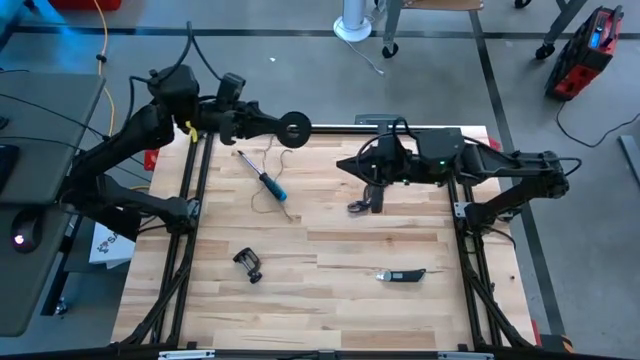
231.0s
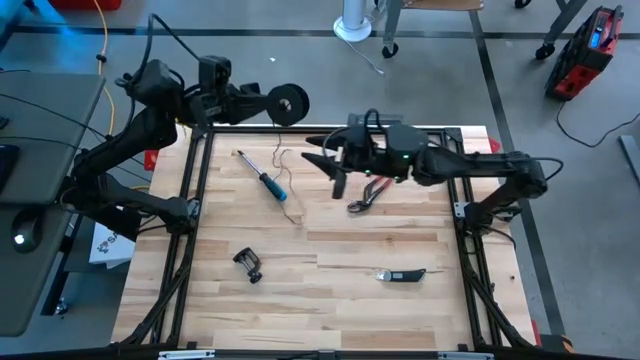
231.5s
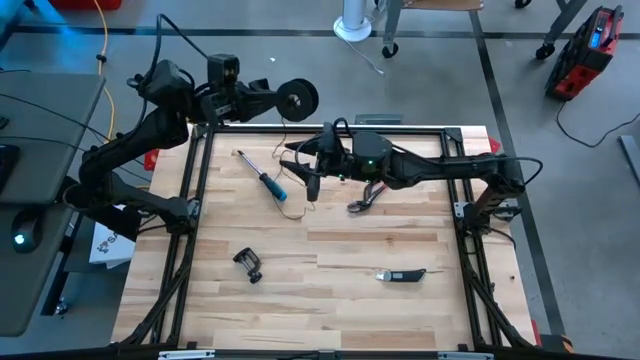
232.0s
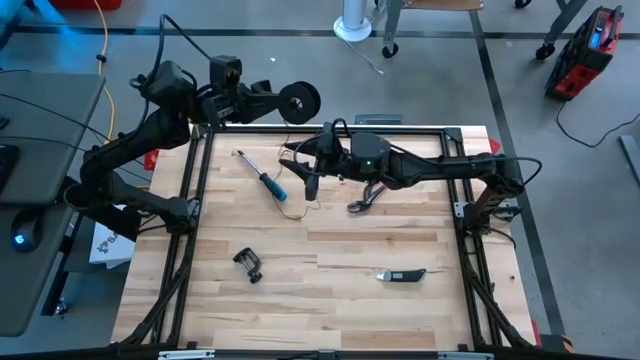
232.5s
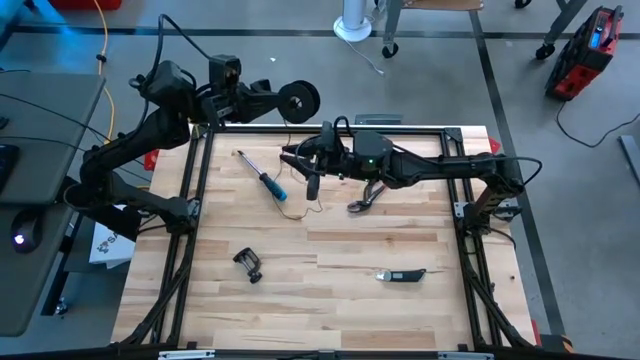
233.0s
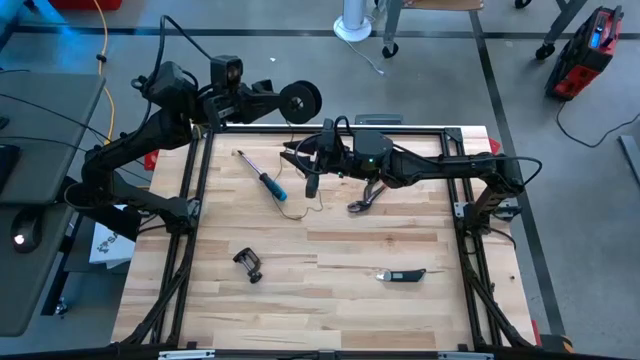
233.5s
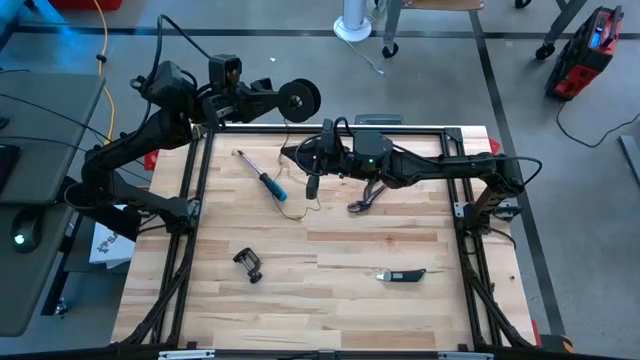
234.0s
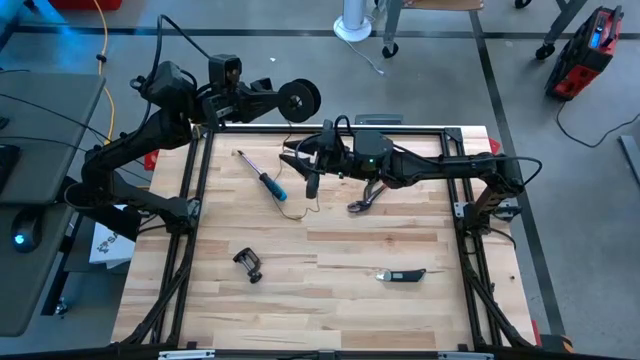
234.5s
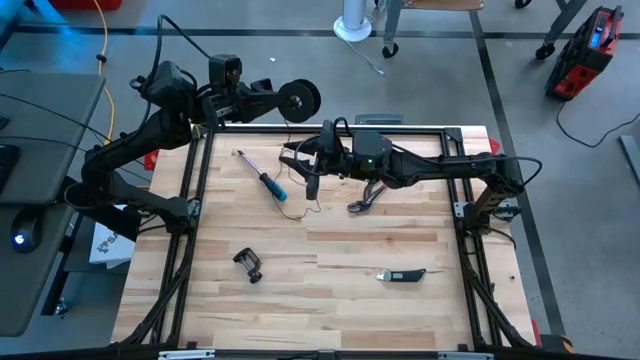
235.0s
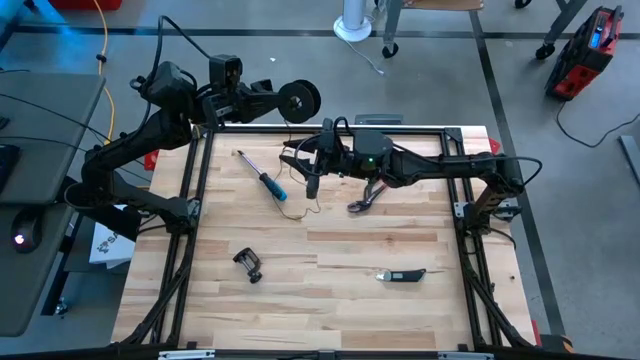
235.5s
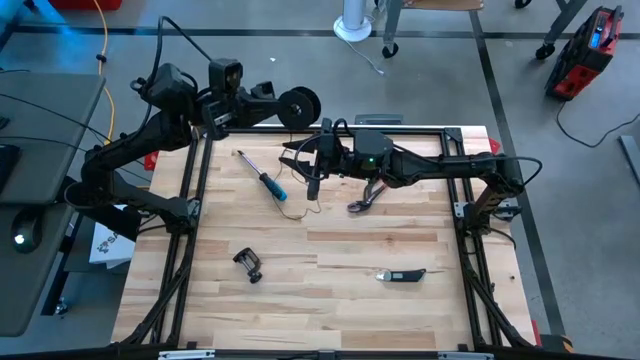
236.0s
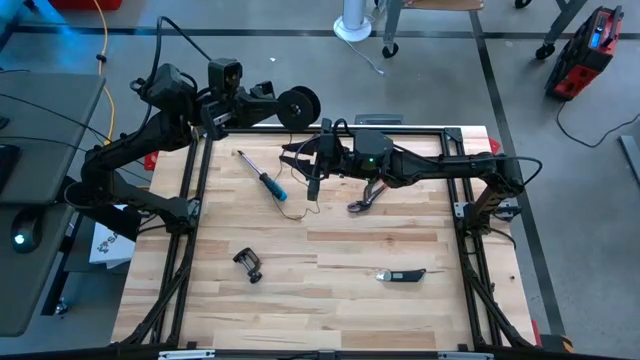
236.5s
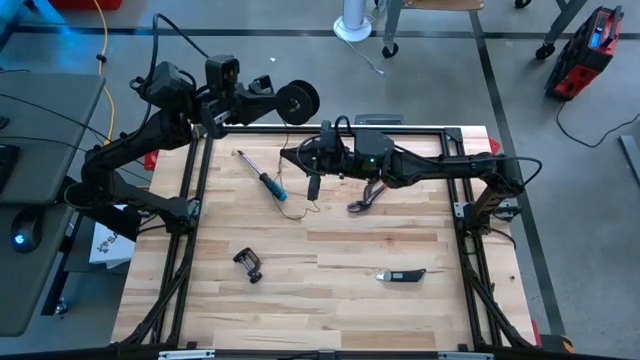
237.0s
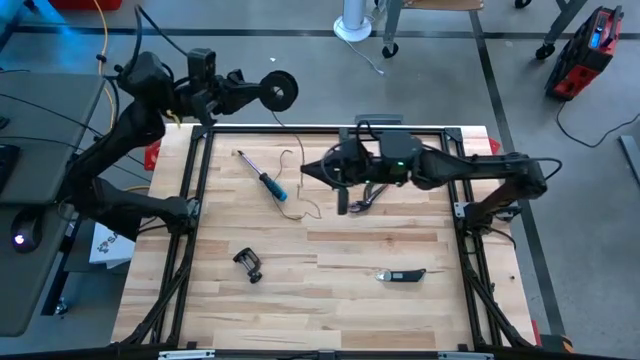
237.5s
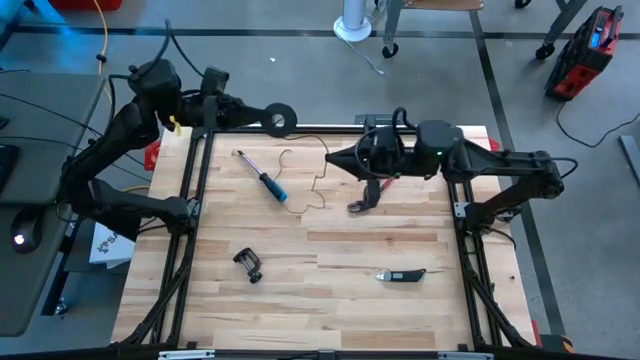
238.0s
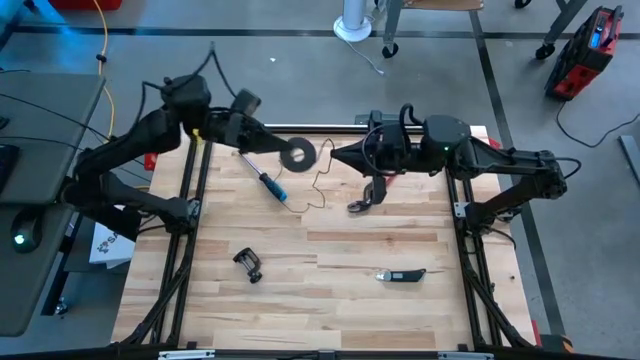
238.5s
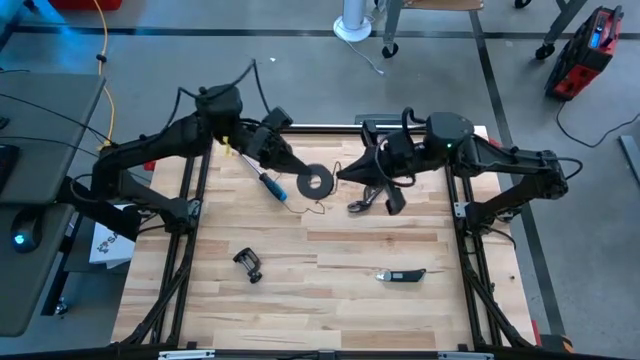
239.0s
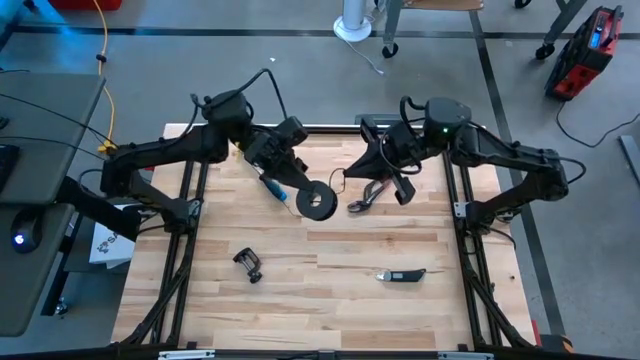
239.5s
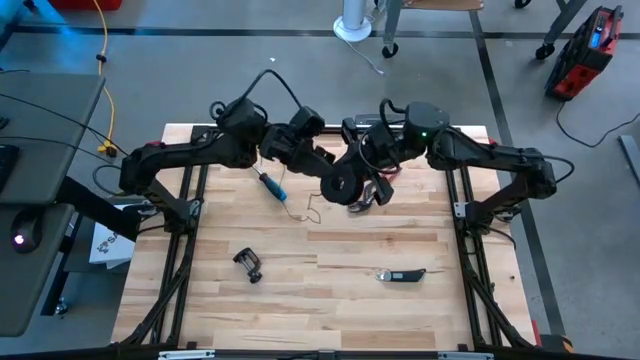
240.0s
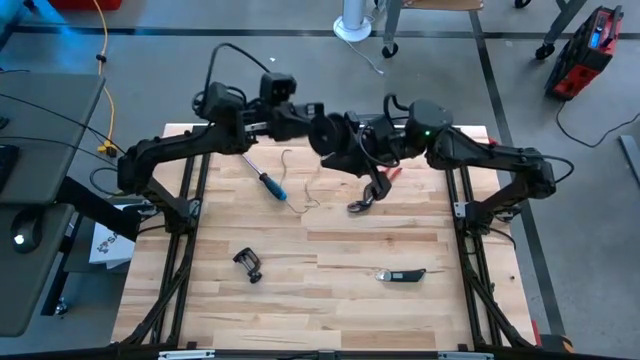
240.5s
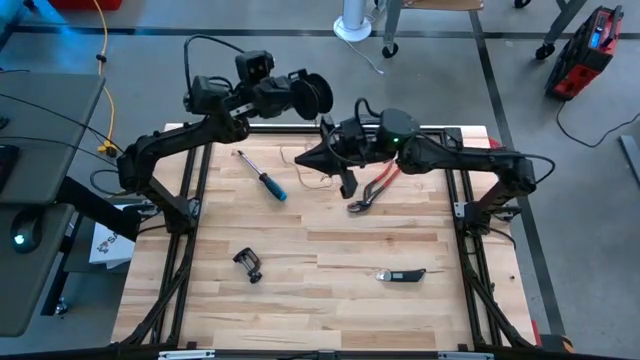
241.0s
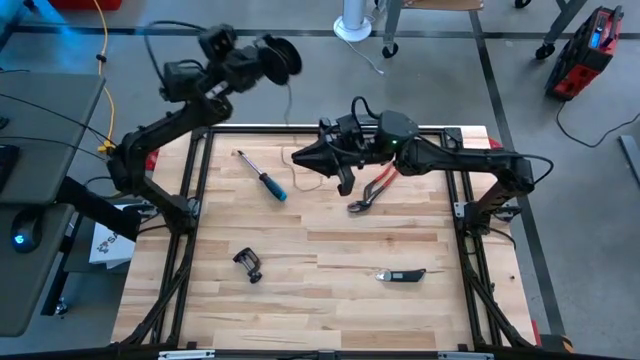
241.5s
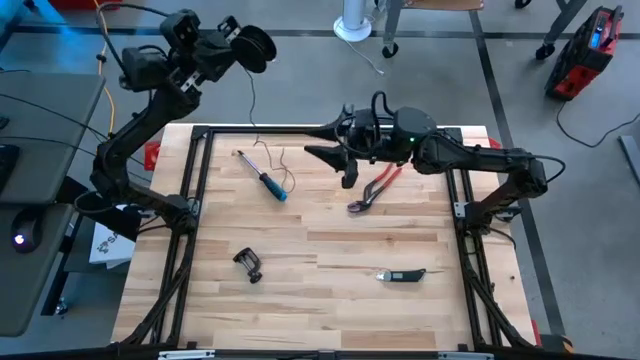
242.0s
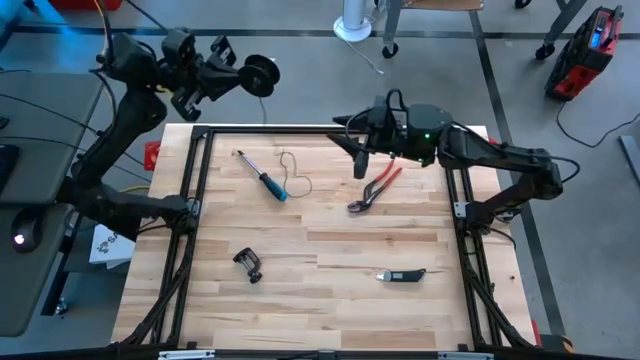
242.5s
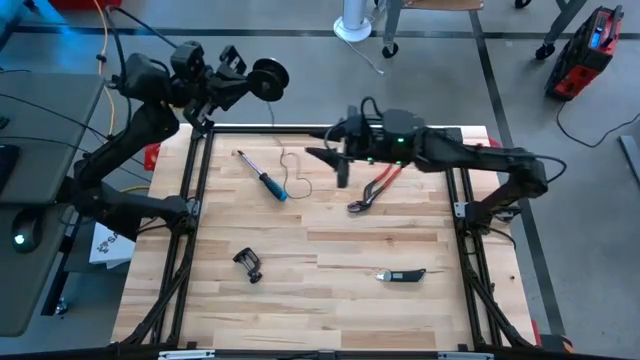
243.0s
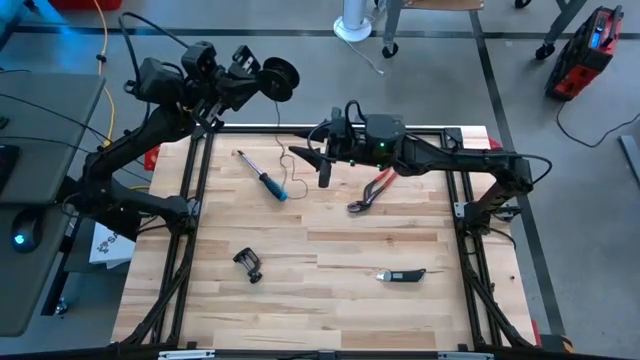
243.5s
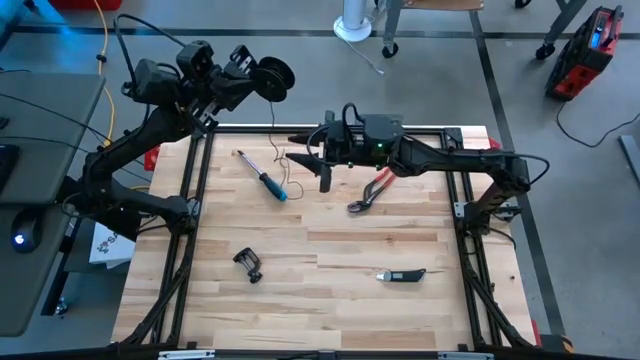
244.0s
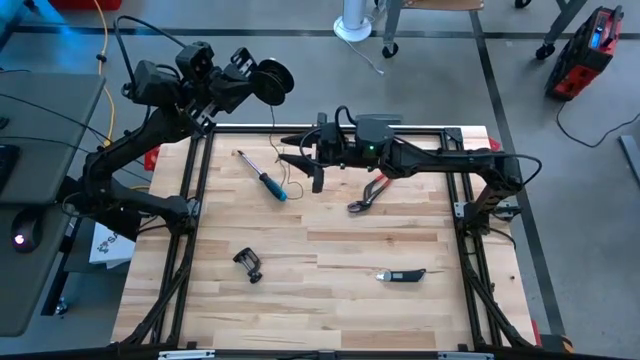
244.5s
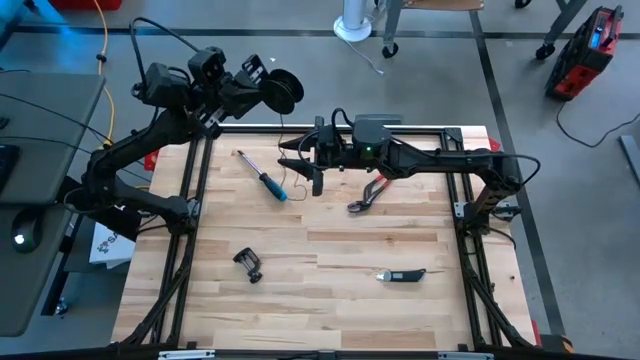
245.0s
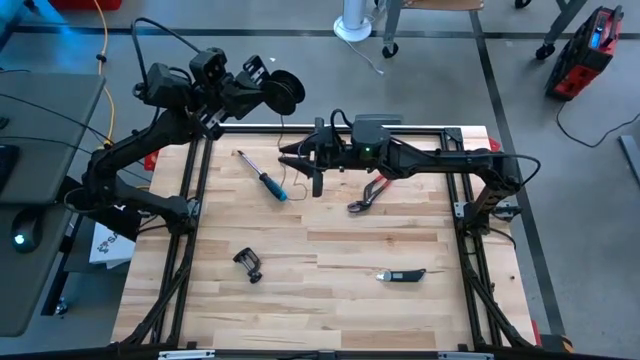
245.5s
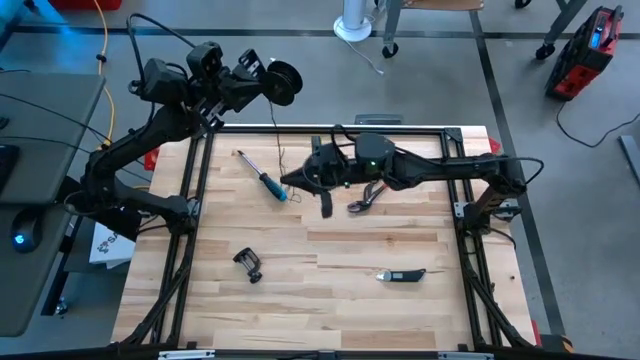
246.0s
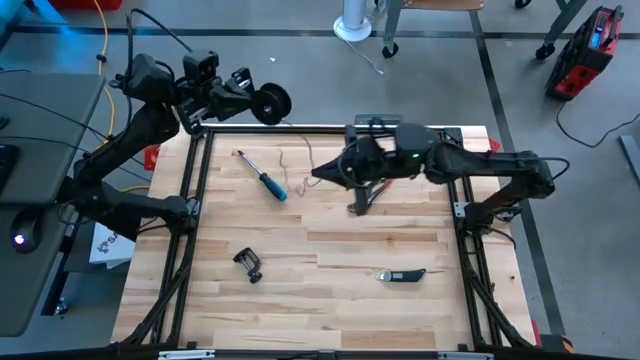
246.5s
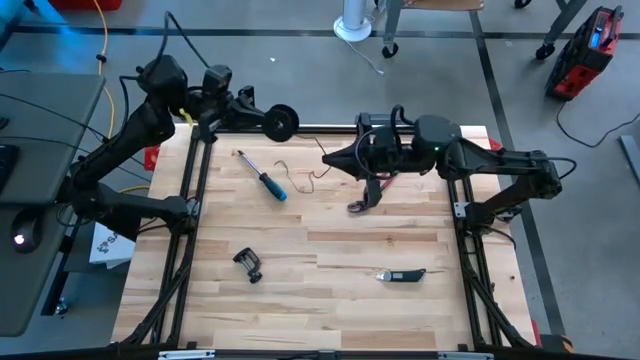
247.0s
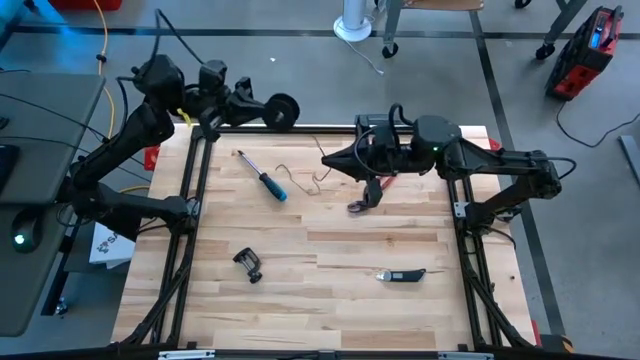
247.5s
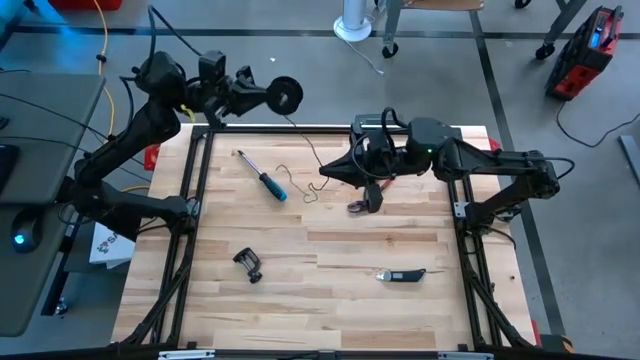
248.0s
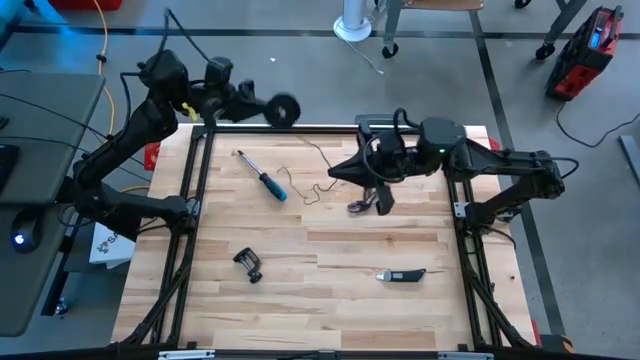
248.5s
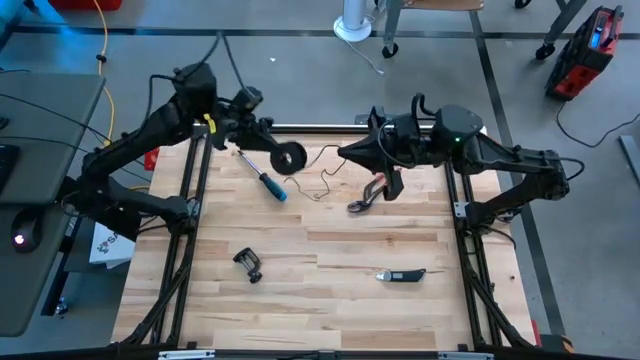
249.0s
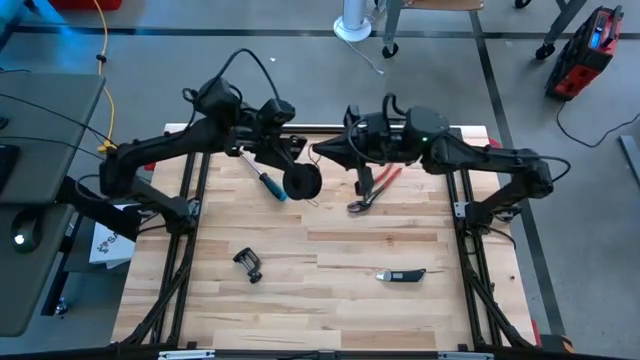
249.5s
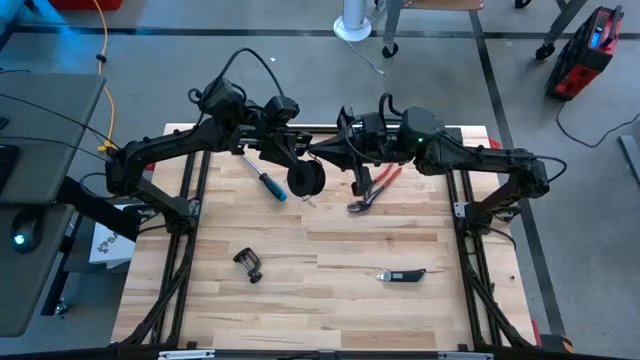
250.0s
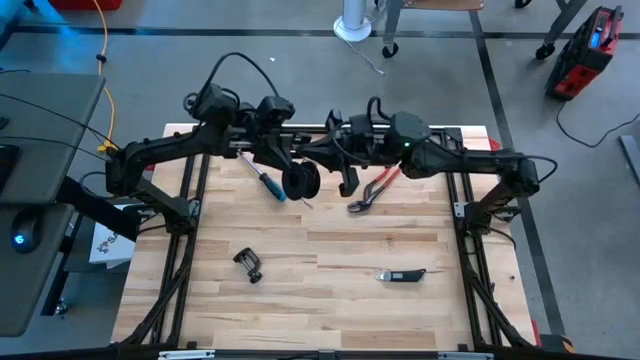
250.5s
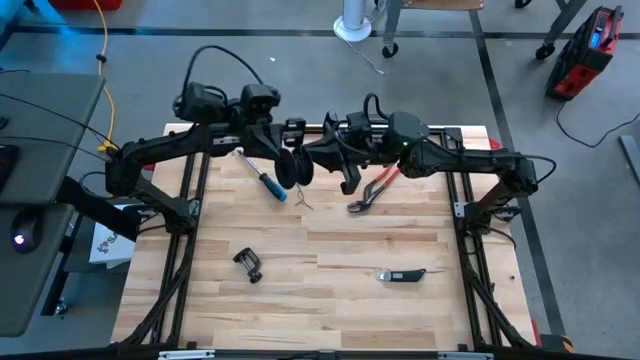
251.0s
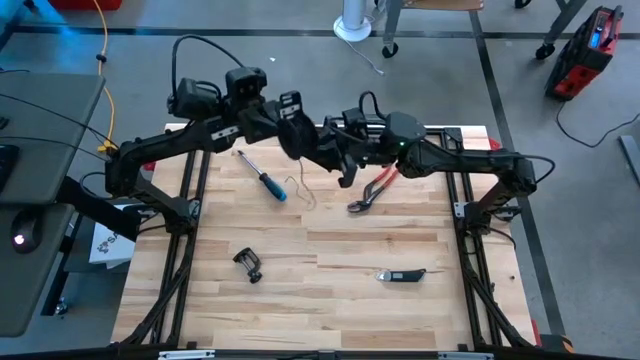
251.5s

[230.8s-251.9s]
Task: Coil cords
Coil the black wire onto the black spool
